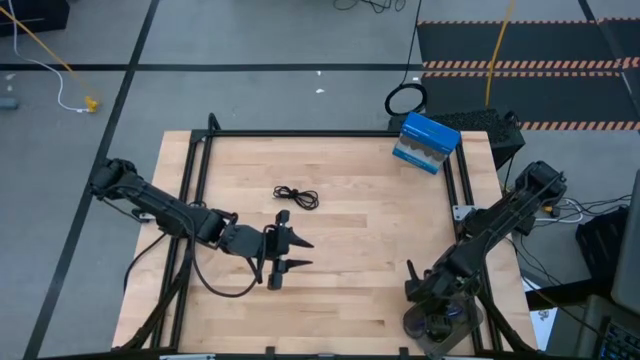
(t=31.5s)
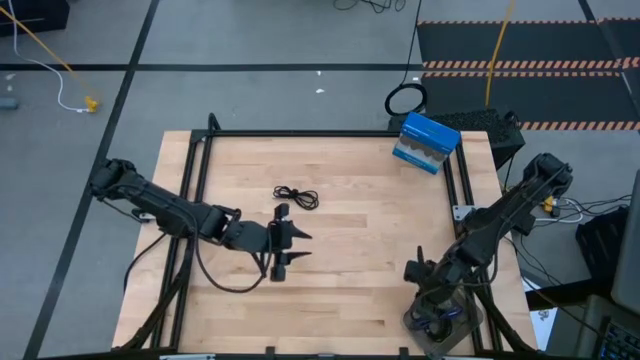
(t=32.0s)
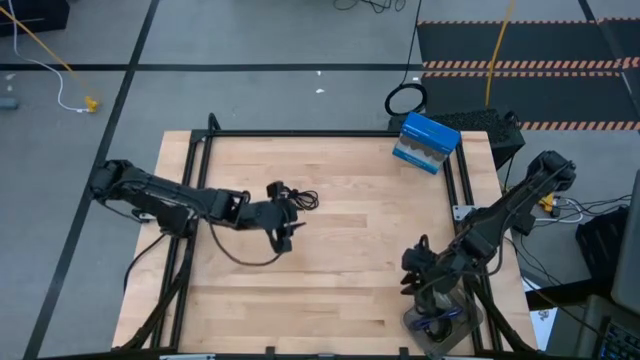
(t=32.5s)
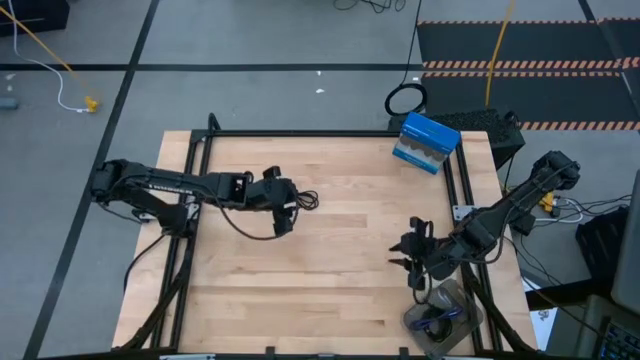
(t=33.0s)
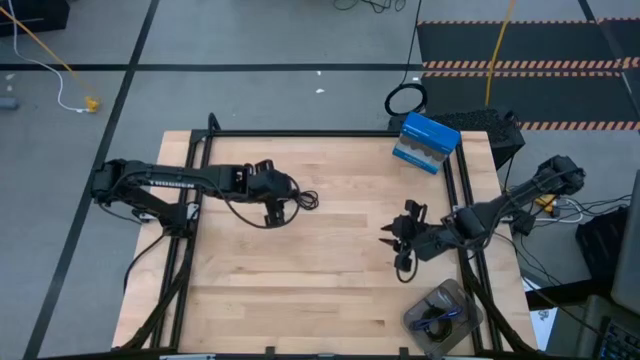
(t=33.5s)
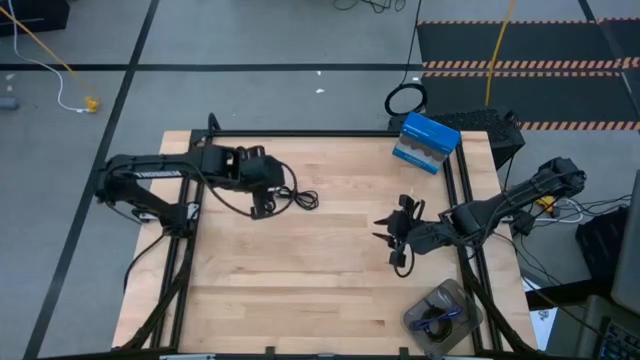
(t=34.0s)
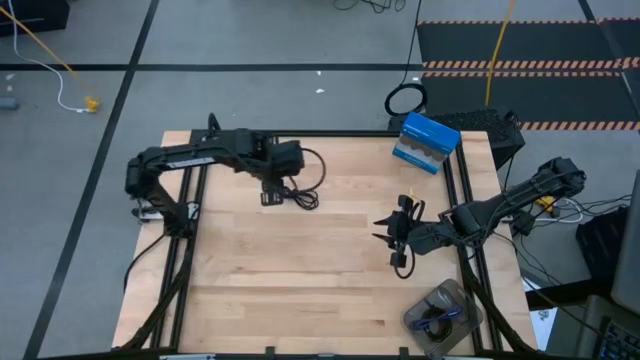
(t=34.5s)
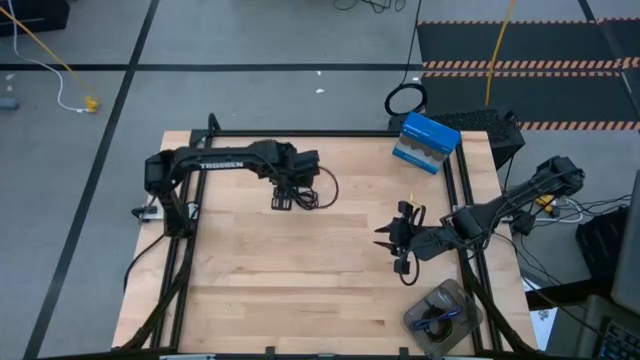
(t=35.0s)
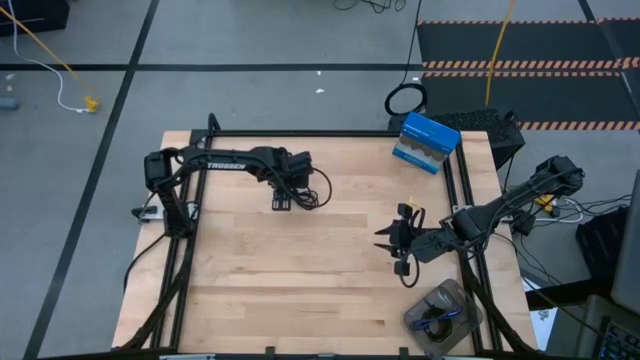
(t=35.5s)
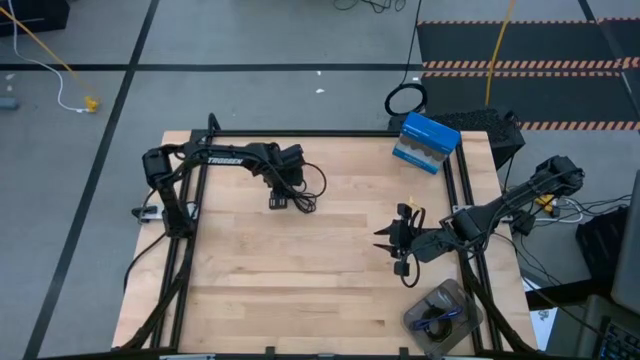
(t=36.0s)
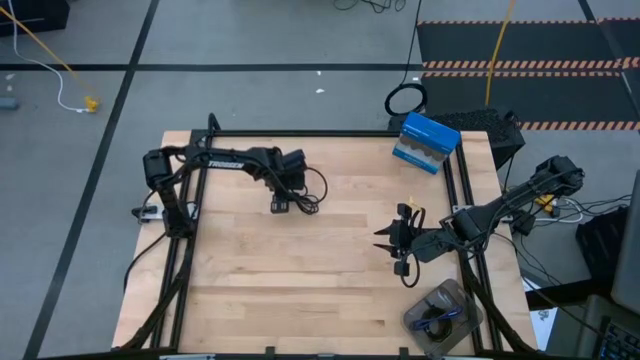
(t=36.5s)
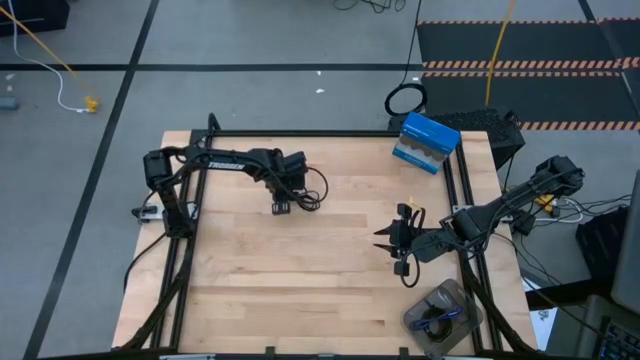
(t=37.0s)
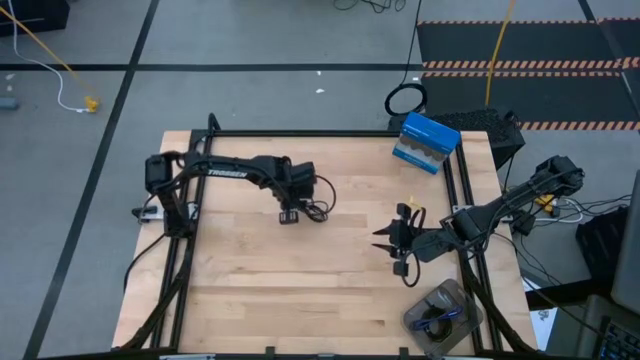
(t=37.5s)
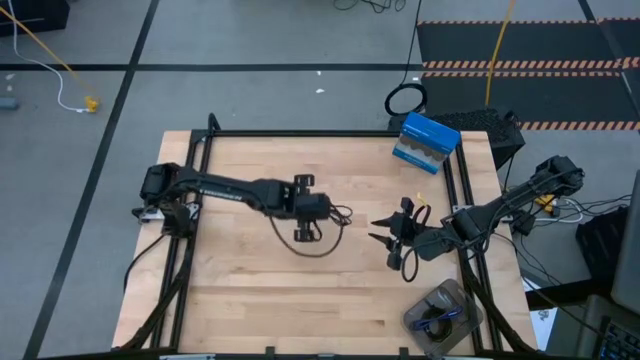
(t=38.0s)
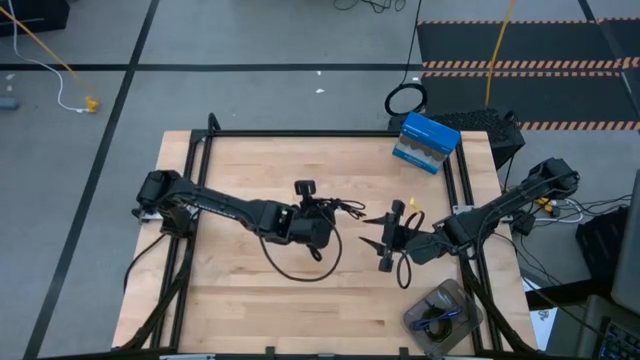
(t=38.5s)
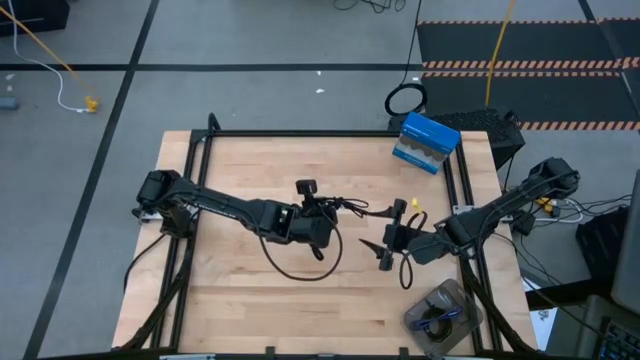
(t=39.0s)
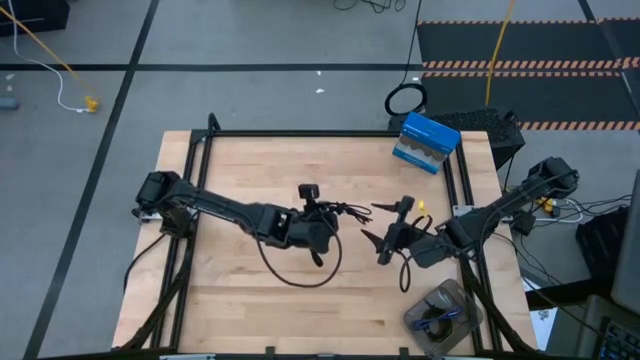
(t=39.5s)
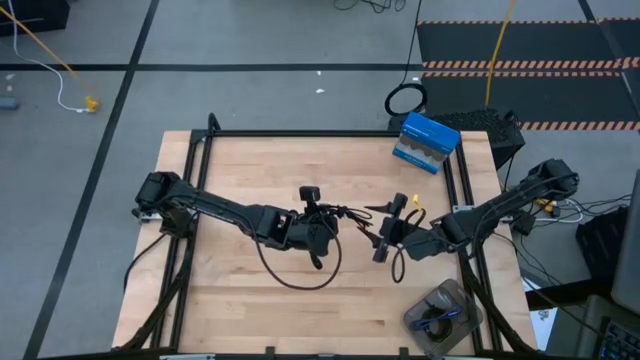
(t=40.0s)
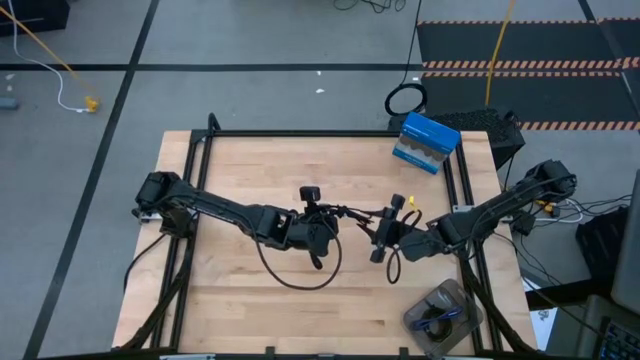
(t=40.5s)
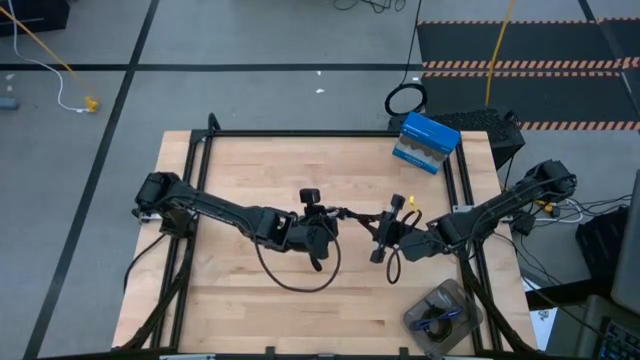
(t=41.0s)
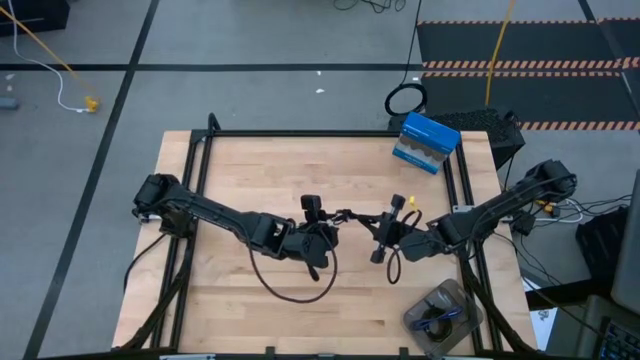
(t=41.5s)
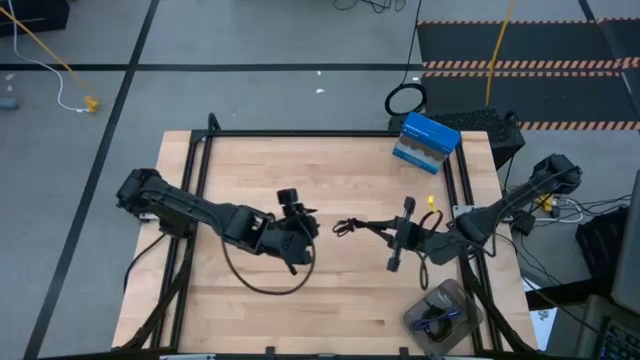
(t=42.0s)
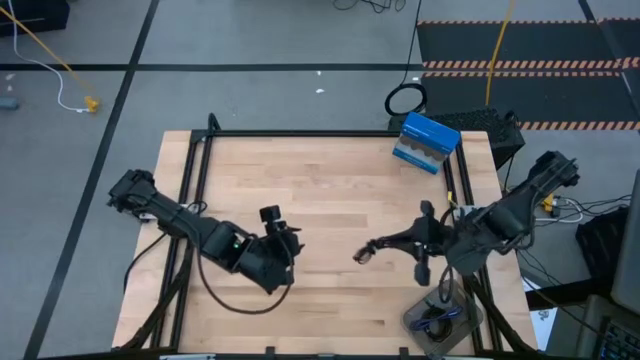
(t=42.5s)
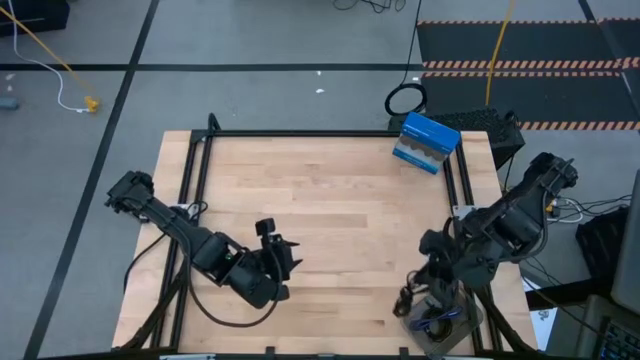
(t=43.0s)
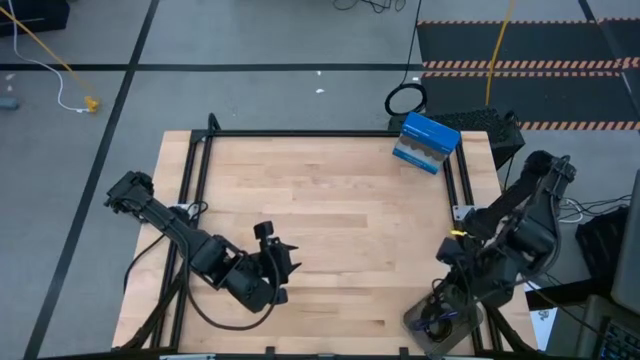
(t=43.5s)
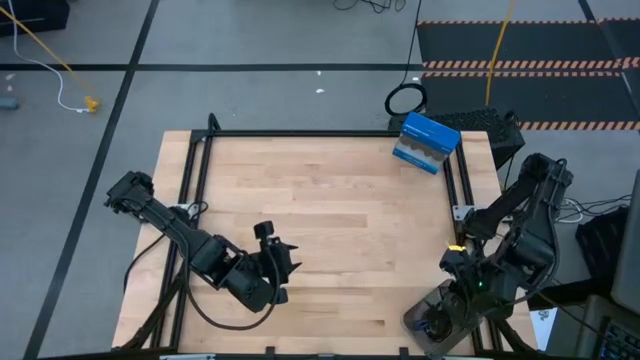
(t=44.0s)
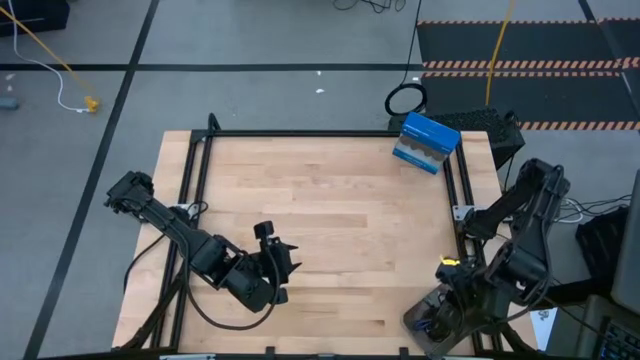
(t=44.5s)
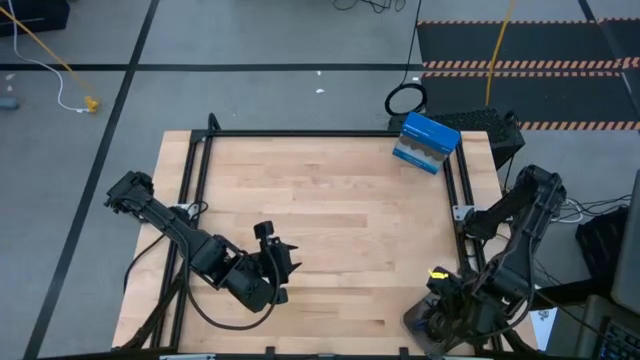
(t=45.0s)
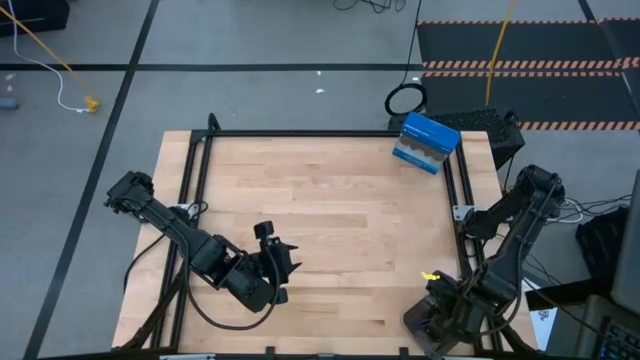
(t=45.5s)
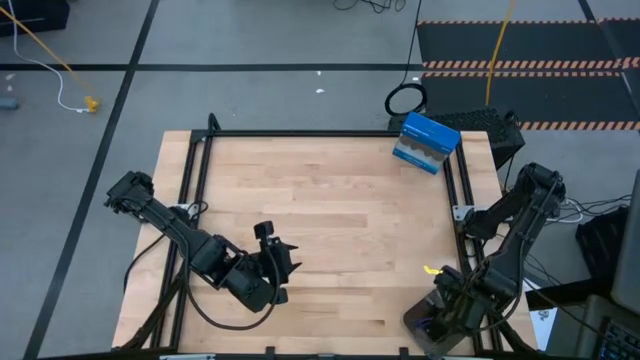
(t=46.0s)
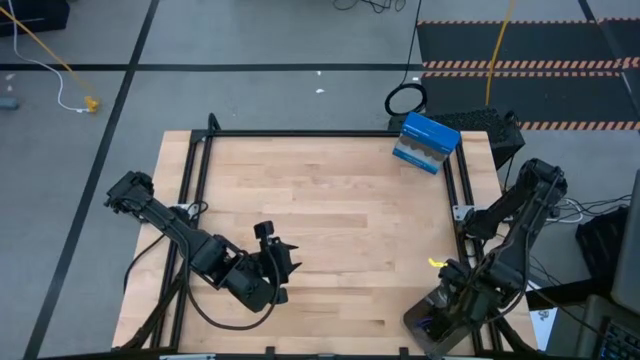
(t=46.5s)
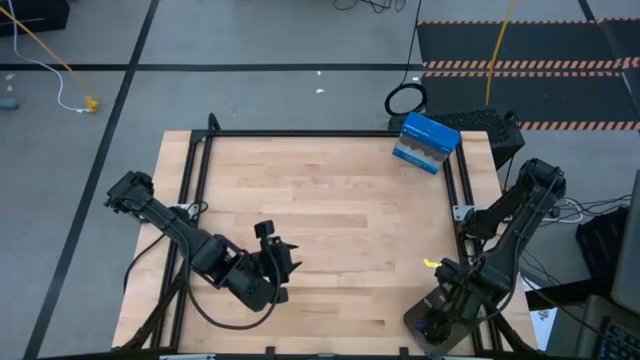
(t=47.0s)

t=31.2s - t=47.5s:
Task: Pick and place USB-C Cables
Put the black charger cable into the black bin
